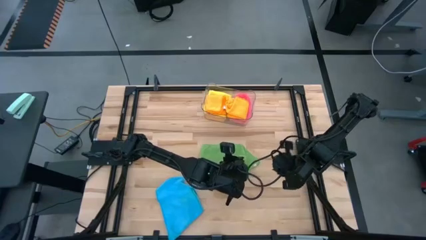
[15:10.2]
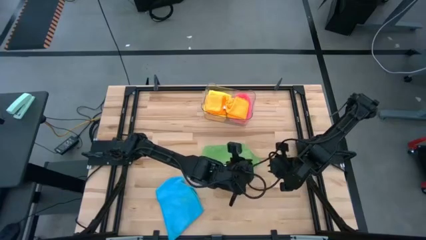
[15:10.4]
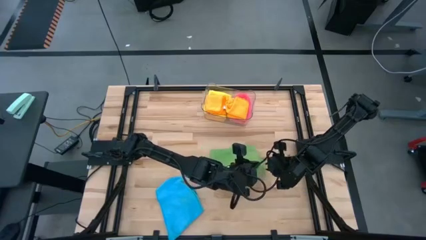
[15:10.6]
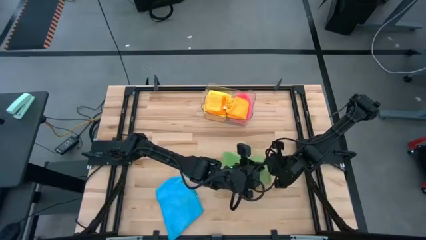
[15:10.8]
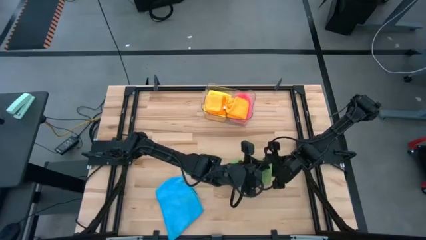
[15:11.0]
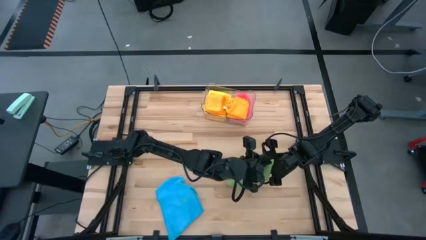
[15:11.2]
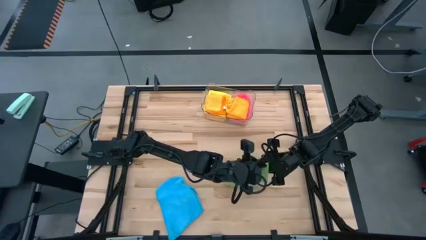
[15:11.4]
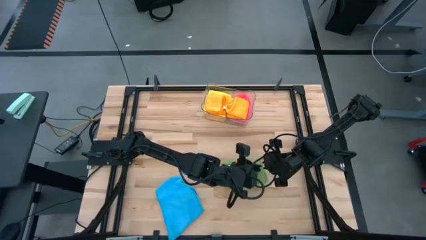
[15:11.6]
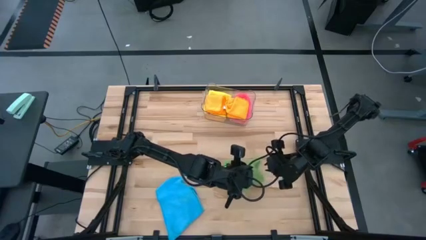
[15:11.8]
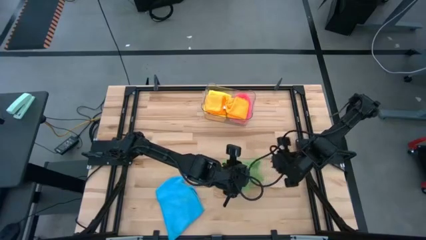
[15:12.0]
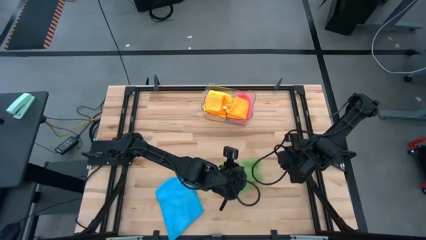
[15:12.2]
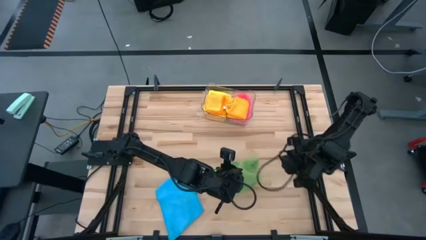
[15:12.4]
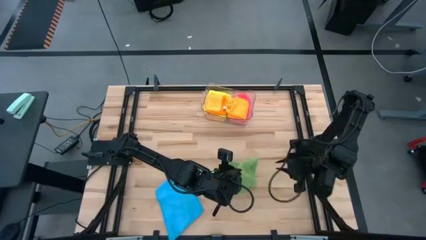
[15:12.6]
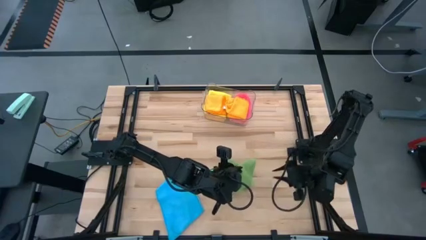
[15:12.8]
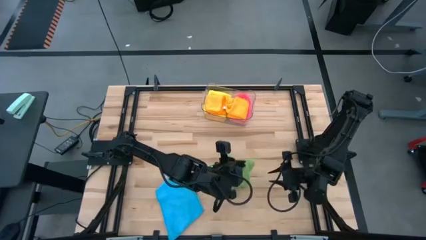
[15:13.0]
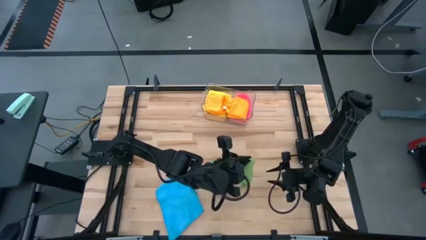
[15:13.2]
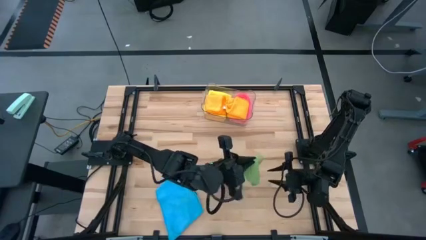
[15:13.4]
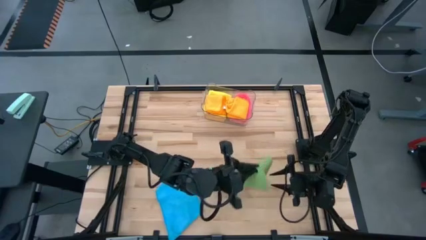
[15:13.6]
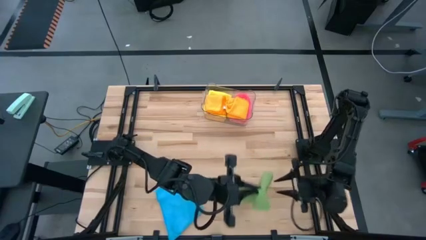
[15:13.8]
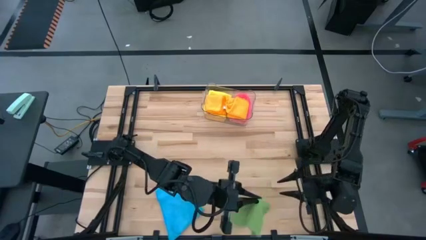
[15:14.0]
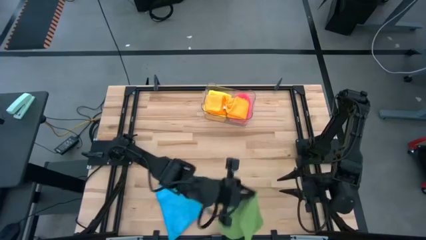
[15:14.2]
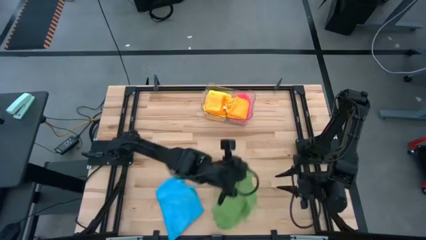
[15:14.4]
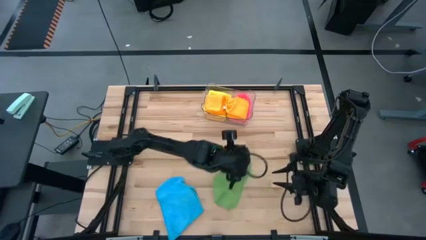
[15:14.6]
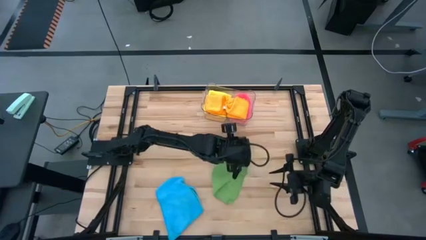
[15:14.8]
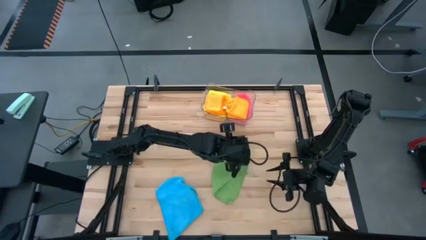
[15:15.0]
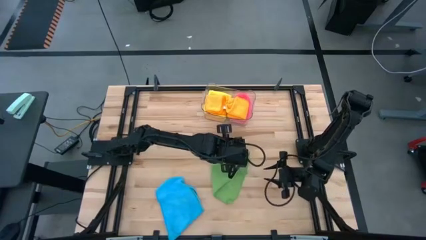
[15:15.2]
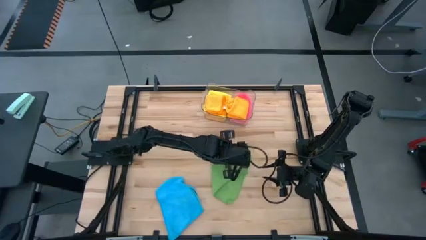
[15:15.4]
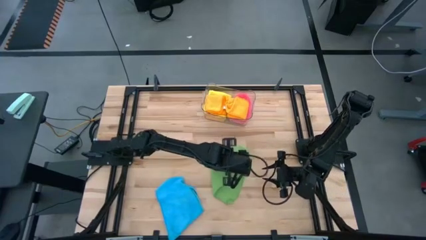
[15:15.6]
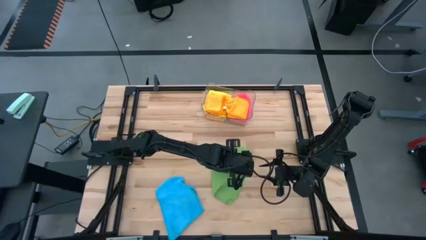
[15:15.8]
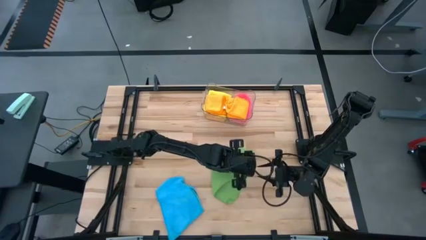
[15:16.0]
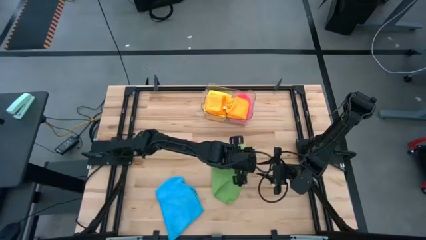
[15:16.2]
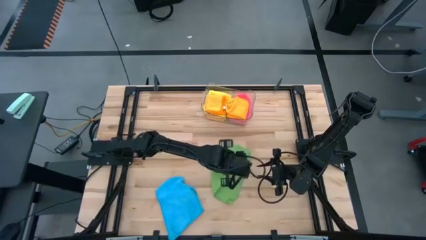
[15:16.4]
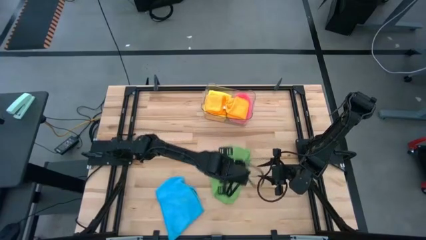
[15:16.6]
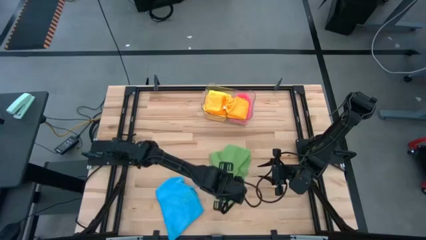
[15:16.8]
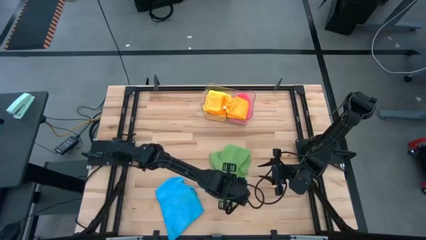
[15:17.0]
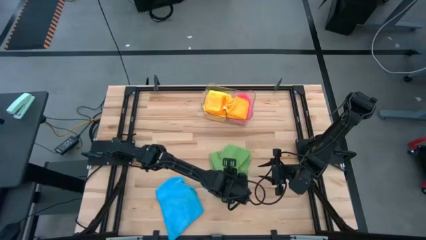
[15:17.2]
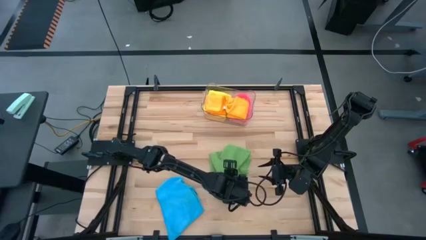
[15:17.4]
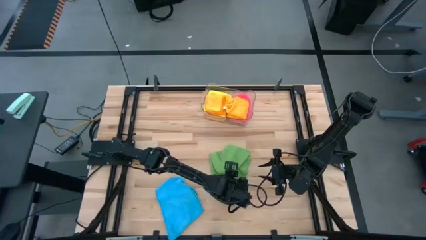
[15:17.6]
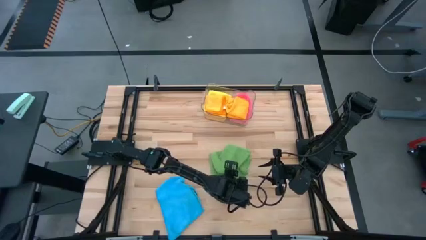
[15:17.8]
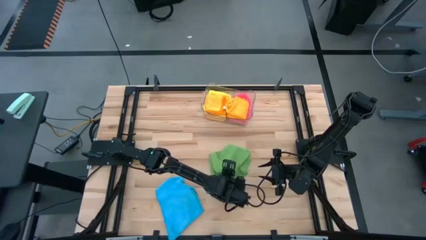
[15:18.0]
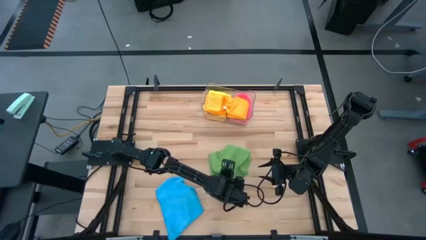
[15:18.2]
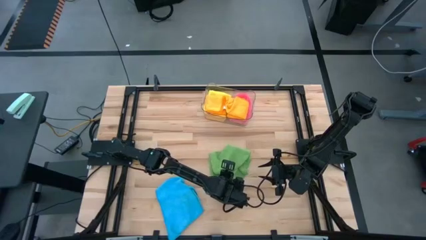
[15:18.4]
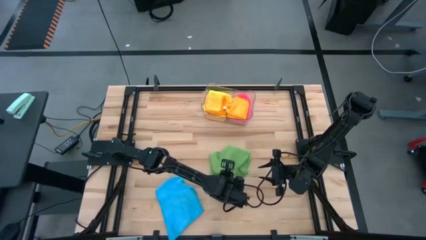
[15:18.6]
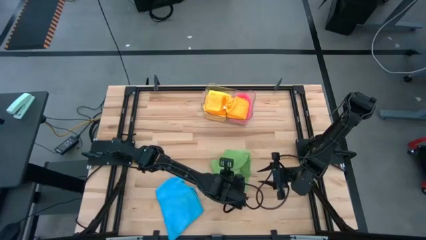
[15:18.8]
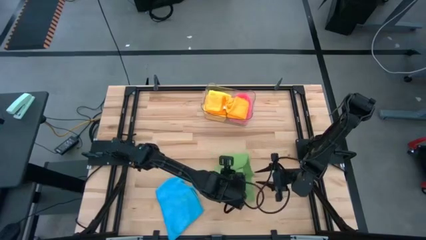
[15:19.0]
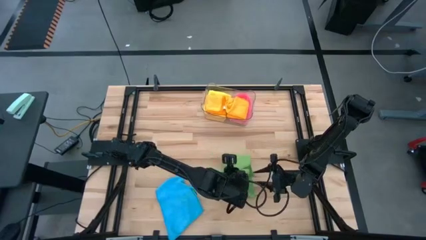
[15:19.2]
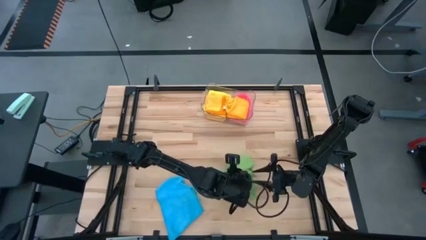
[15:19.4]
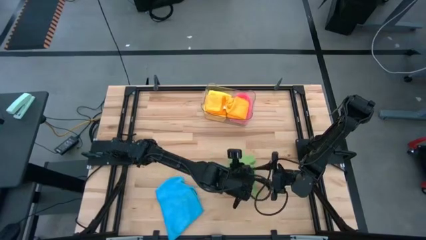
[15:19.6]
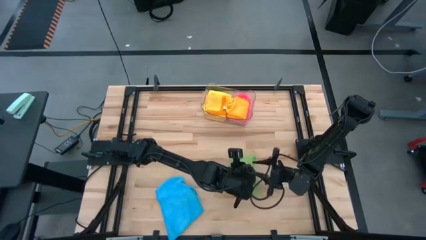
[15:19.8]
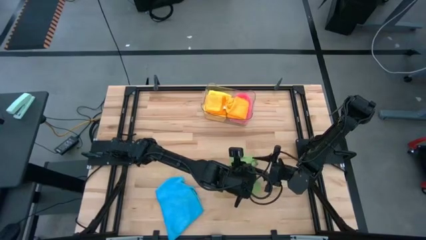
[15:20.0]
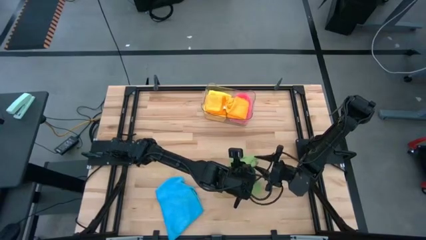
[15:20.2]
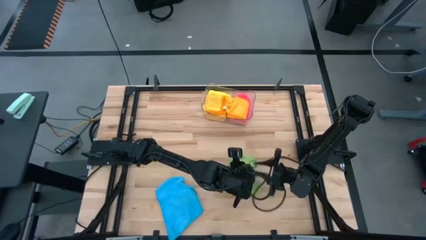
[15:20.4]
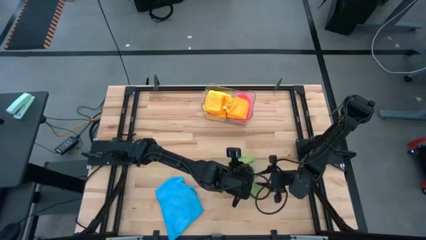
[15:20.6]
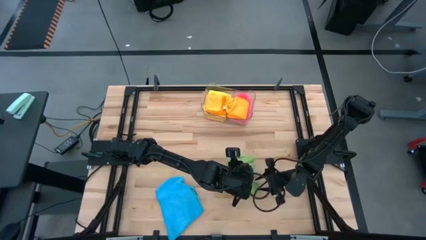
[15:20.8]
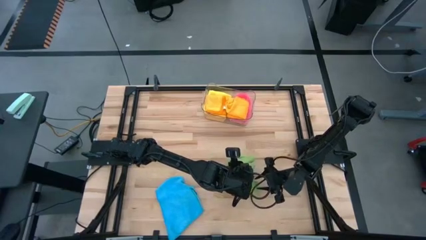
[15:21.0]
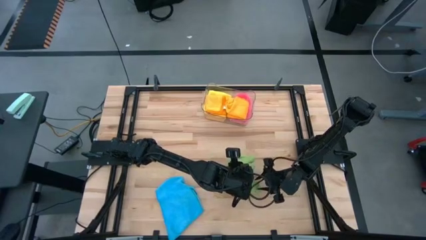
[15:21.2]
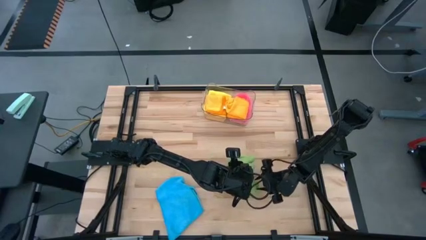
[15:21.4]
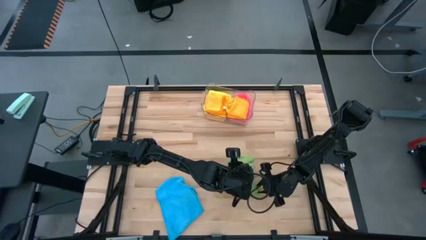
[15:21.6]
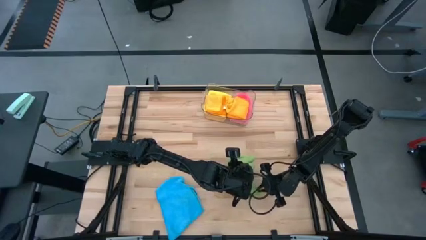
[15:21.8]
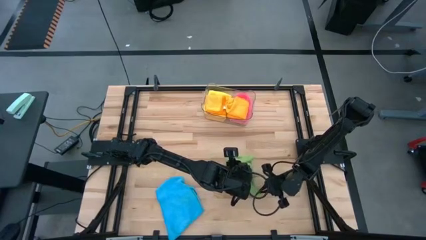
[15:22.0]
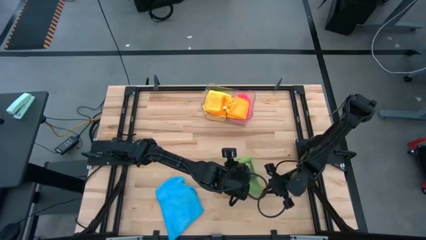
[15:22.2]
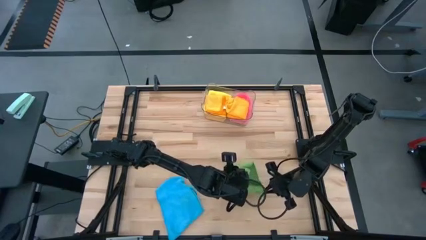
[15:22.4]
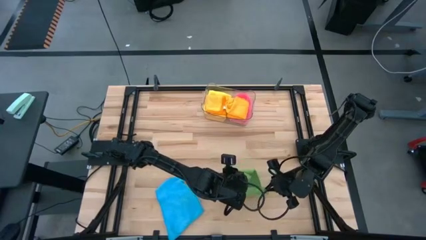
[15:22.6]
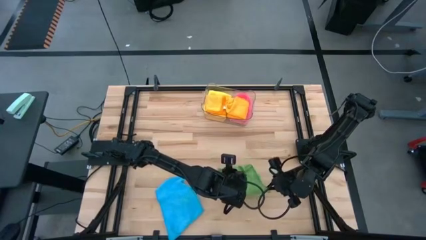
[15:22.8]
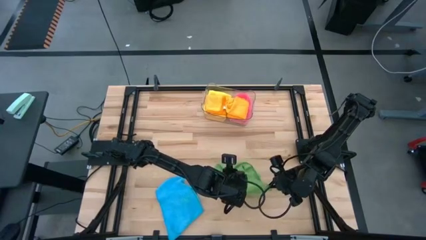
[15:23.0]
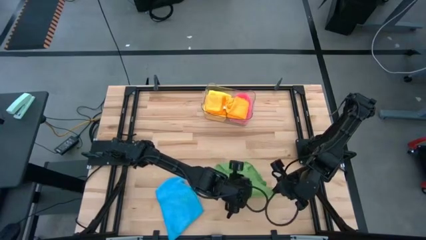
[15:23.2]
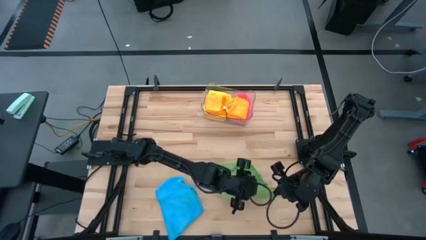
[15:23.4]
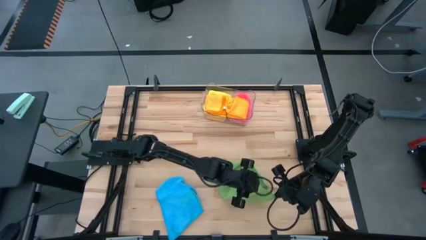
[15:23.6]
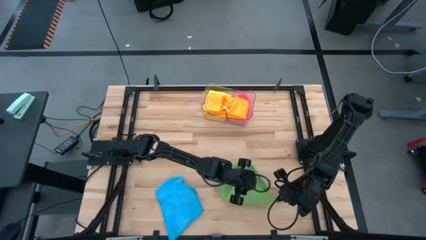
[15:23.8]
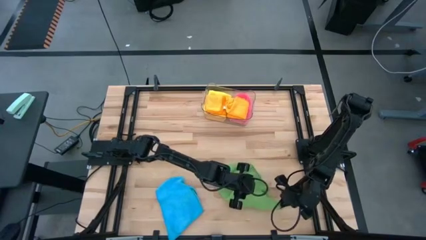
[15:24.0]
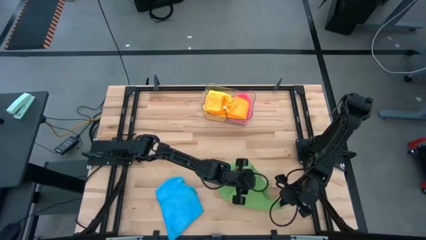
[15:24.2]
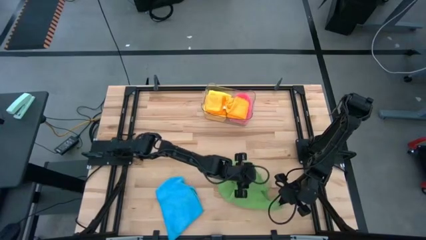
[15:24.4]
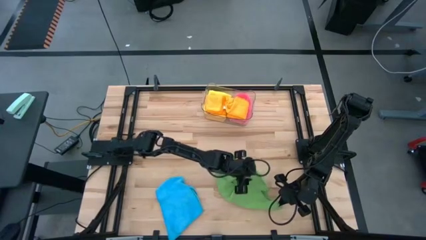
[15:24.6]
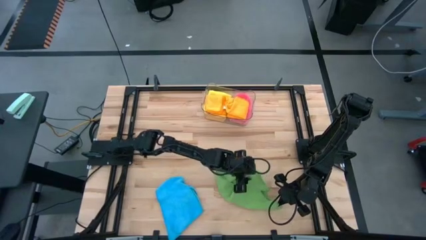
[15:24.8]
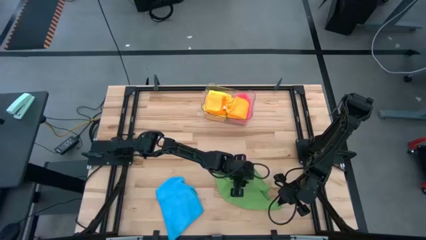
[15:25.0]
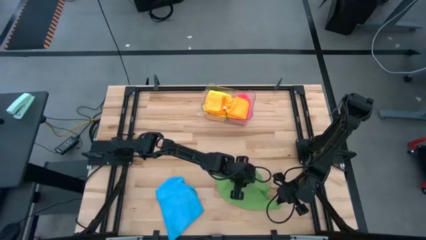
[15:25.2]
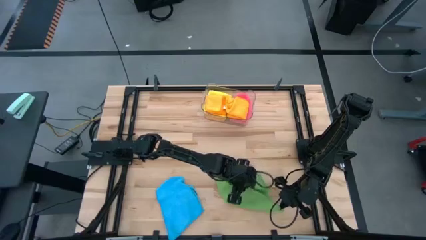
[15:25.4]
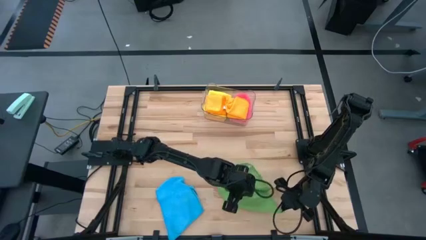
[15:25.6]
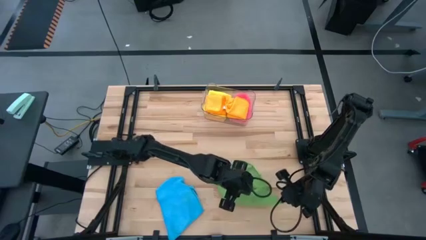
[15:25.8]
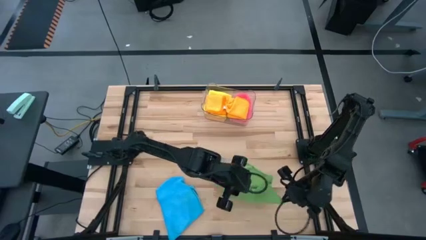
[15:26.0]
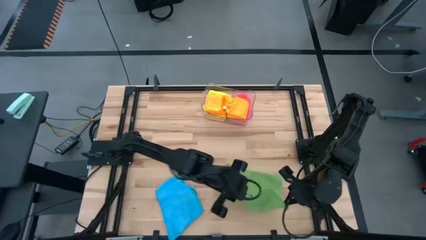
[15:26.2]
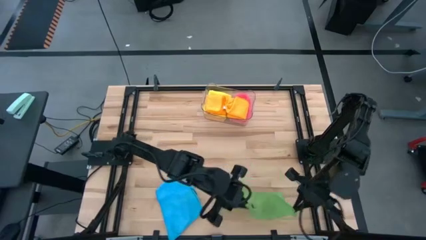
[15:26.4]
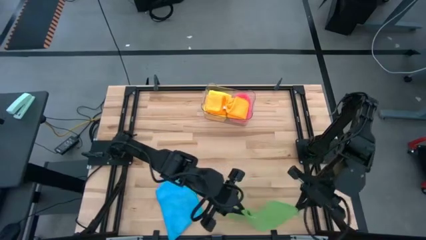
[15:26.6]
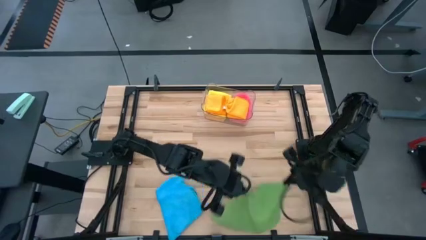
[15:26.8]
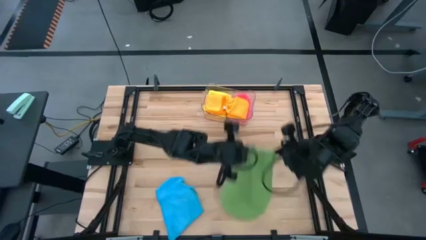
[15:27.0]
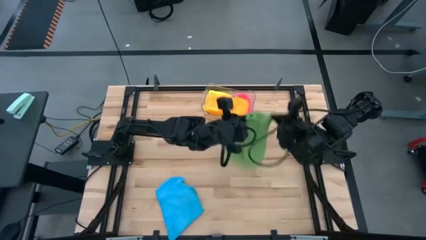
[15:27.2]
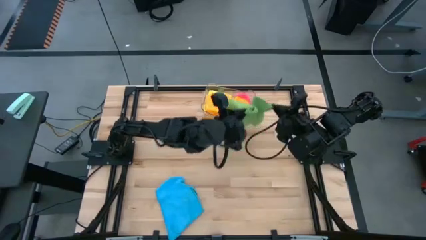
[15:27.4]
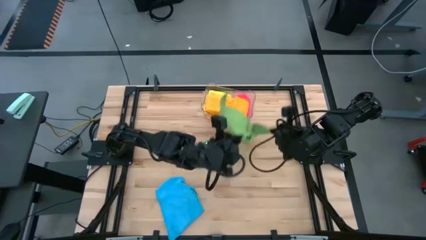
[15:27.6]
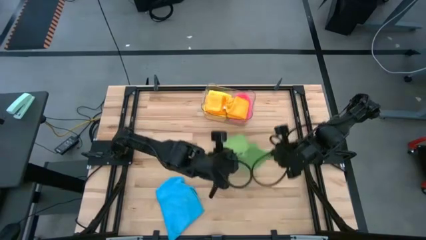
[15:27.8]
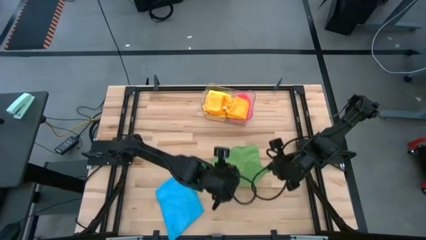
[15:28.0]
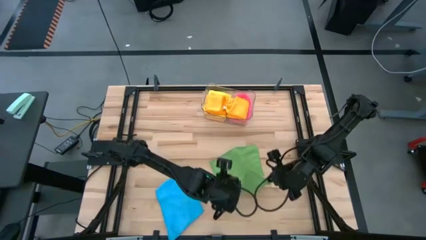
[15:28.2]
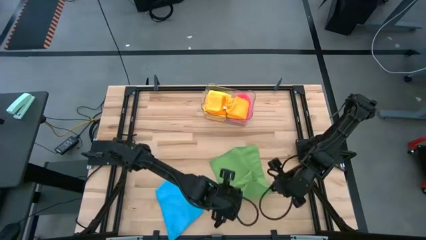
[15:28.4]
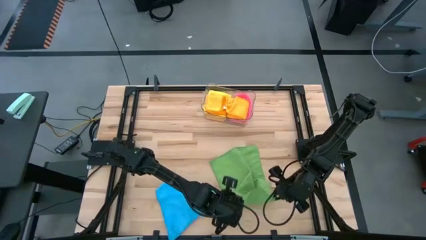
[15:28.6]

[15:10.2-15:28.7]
Task: Fold microfiber towels
Fold the green microfiber cloth
